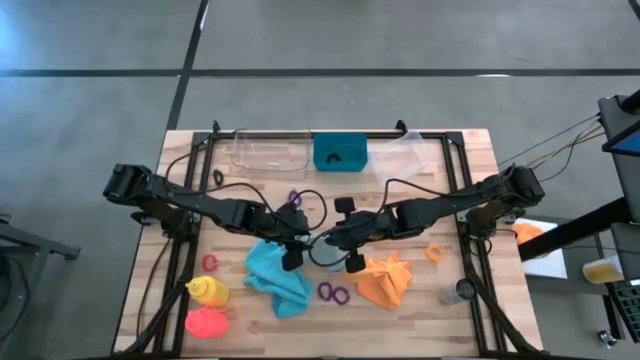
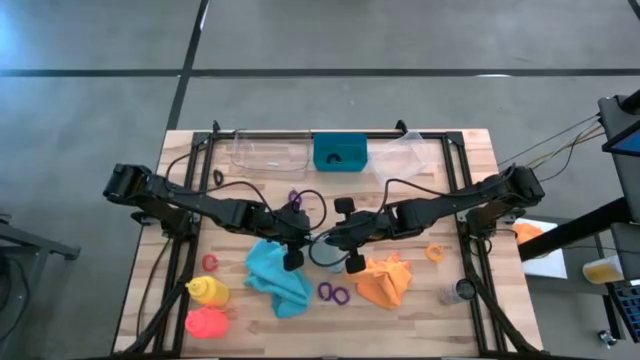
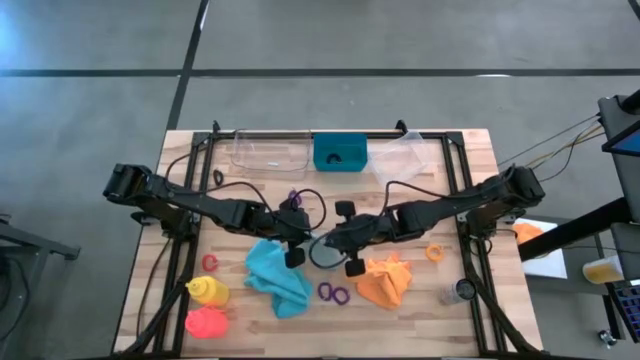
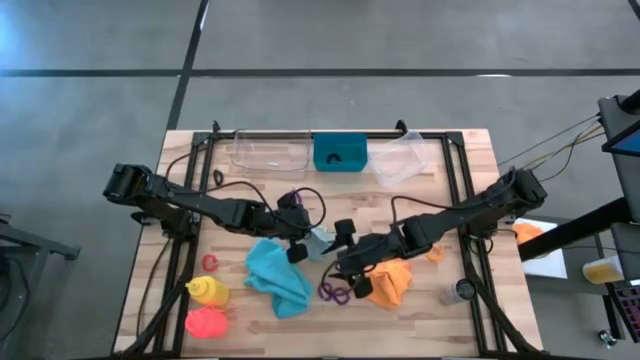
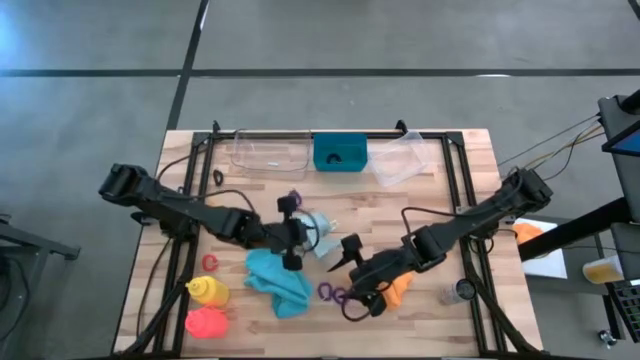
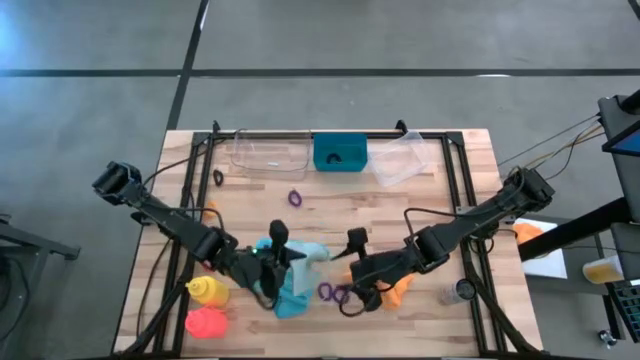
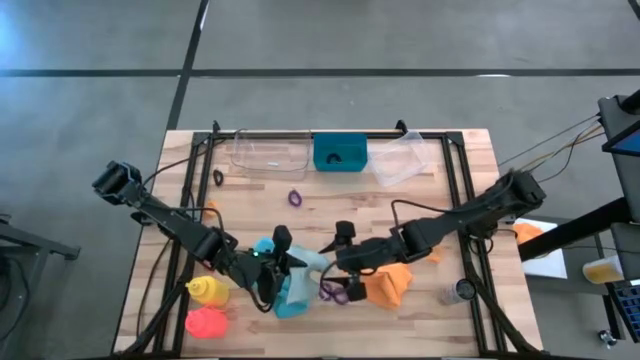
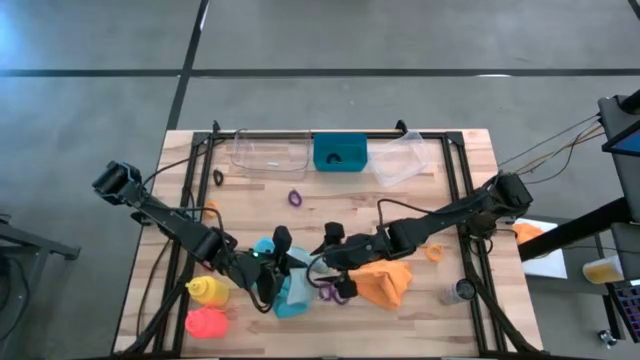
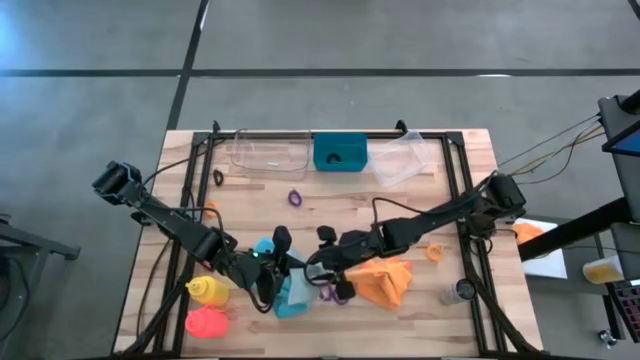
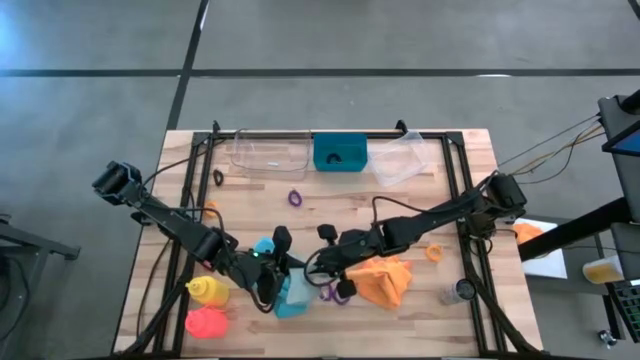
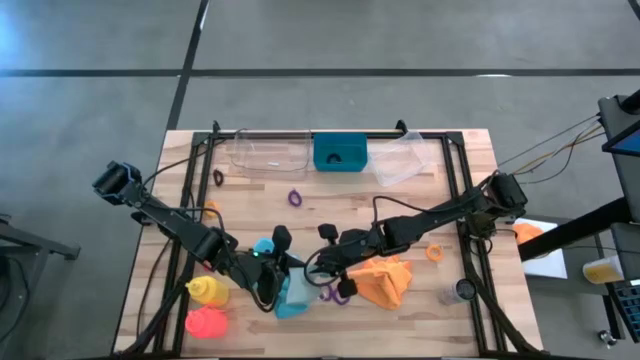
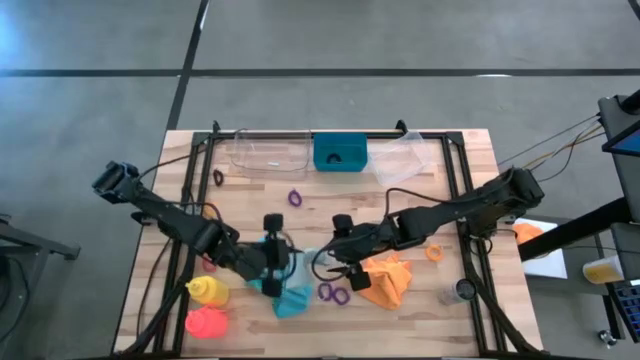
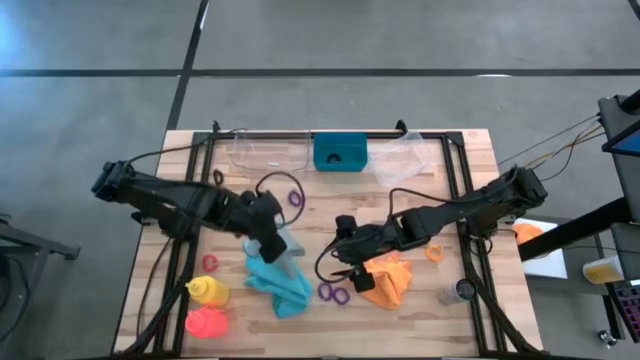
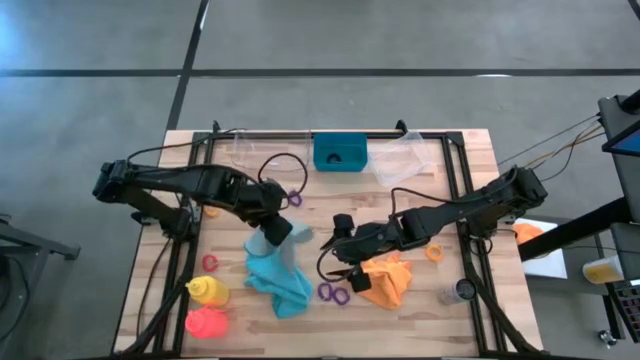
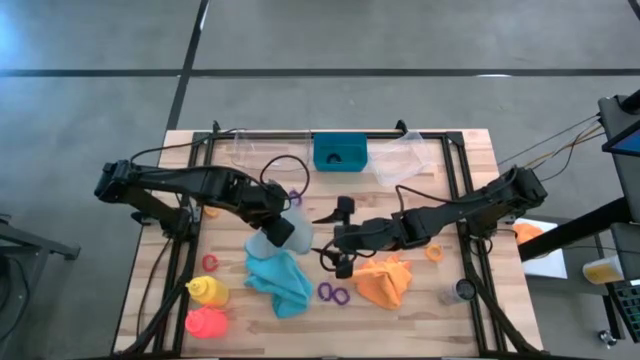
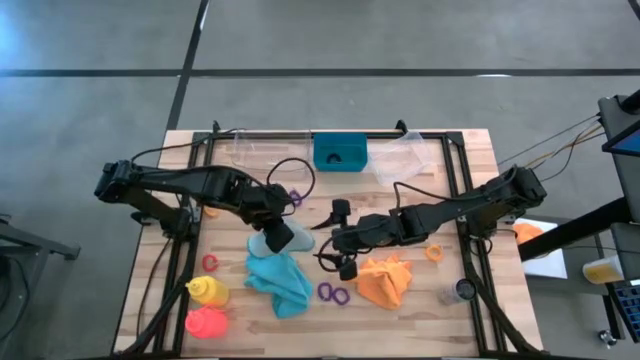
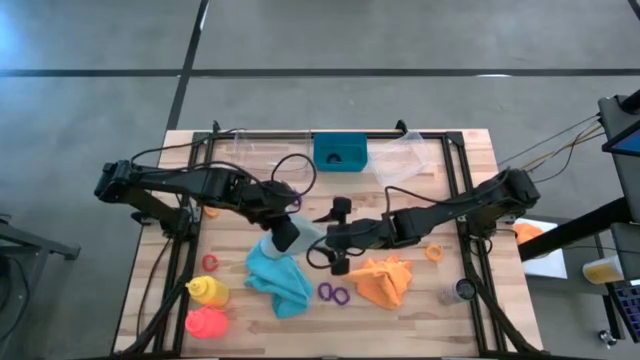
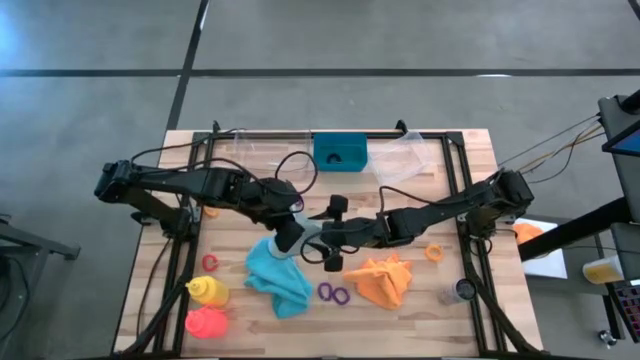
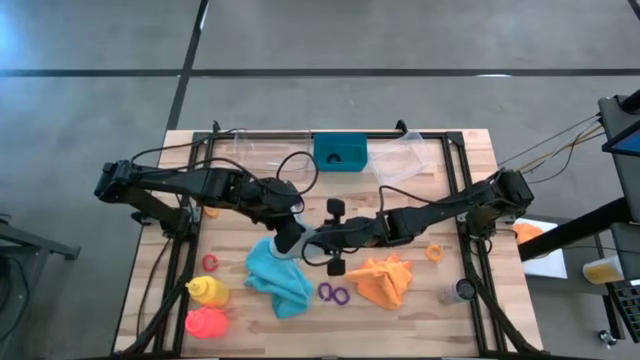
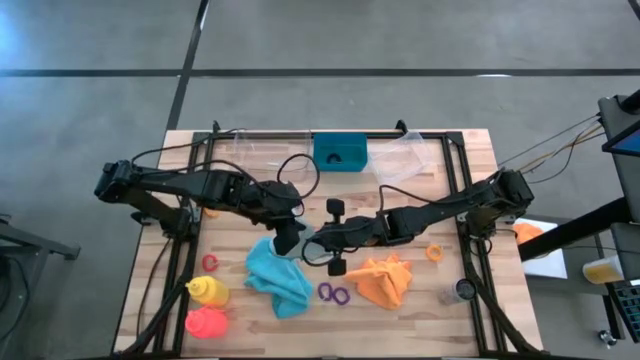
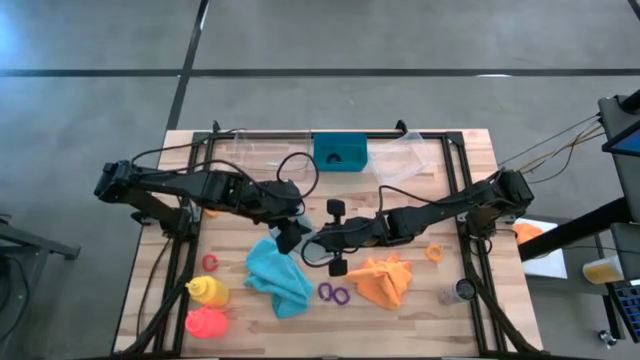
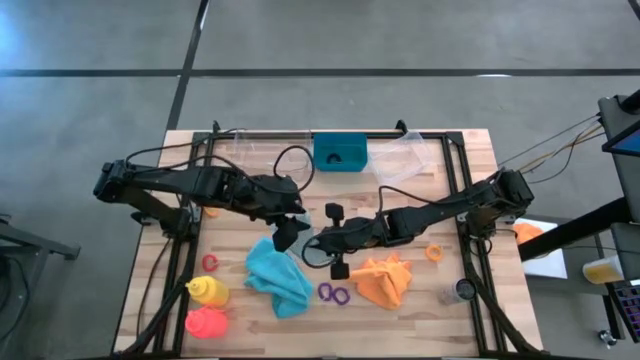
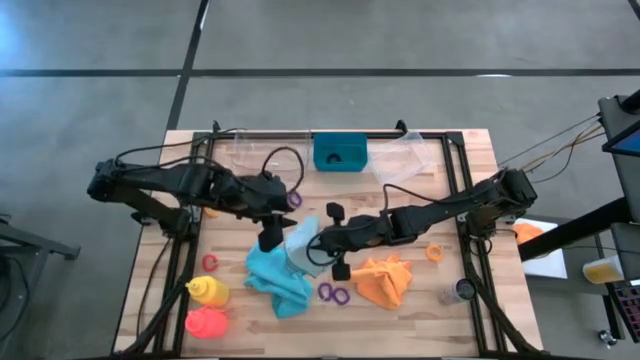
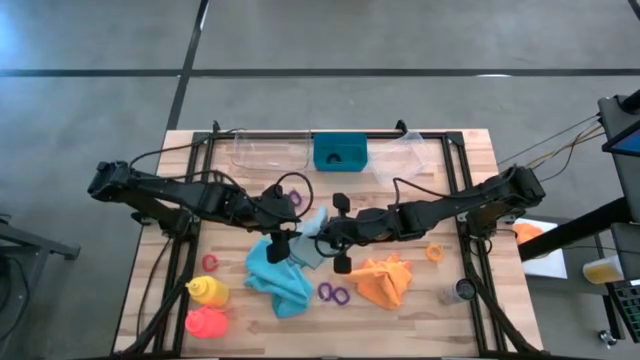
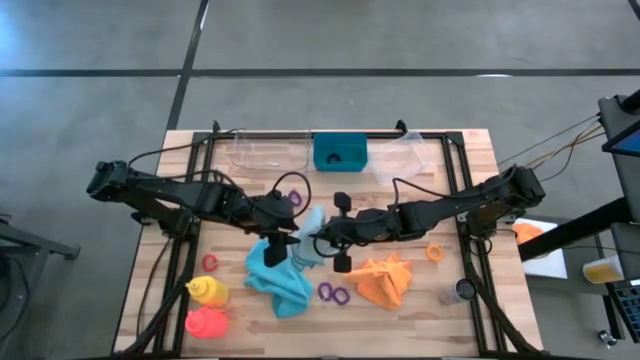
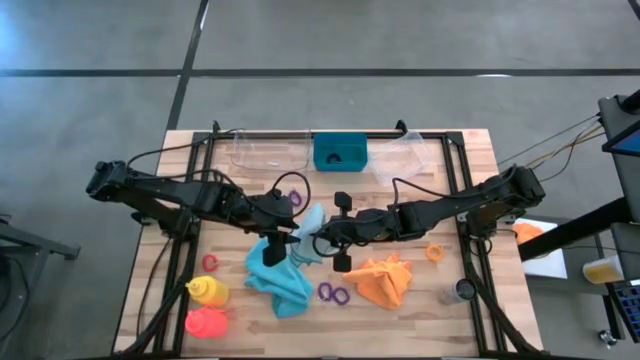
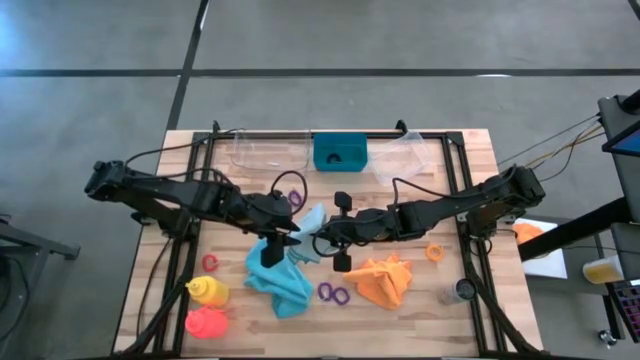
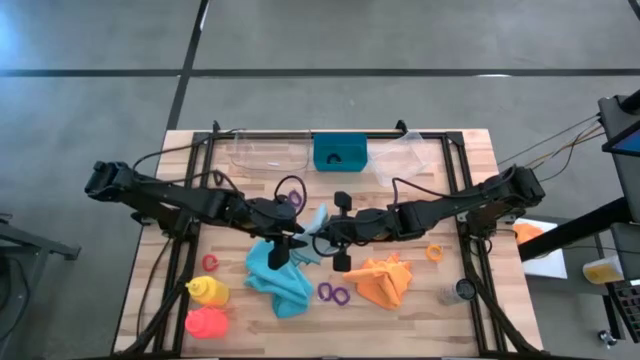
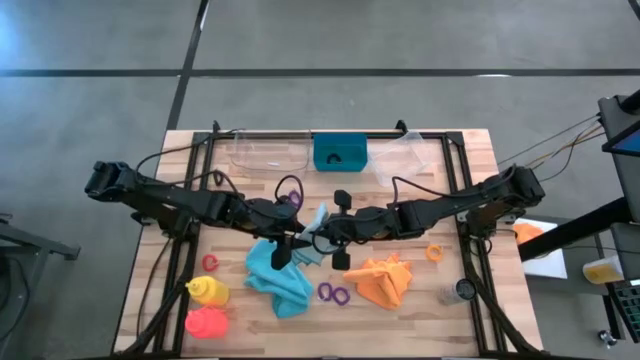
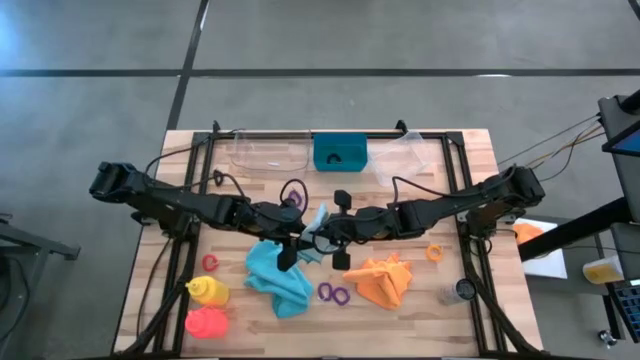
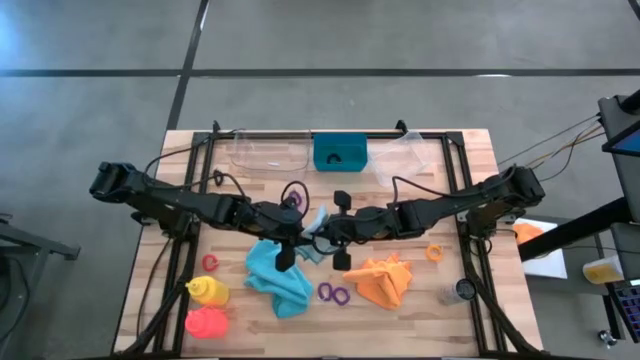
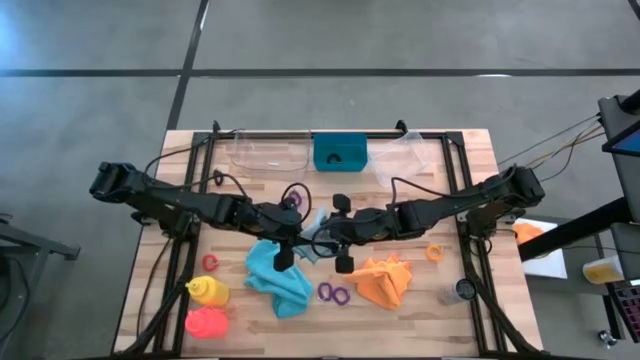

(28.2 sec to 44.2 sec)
Task: Pick & Place Sports Items
Fold the light blue towel

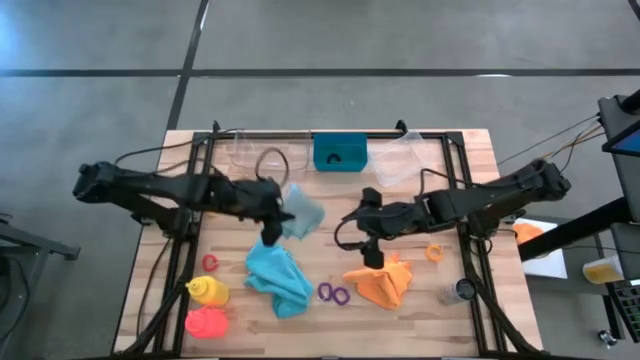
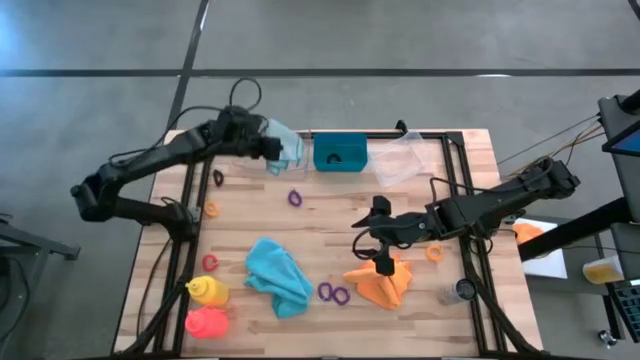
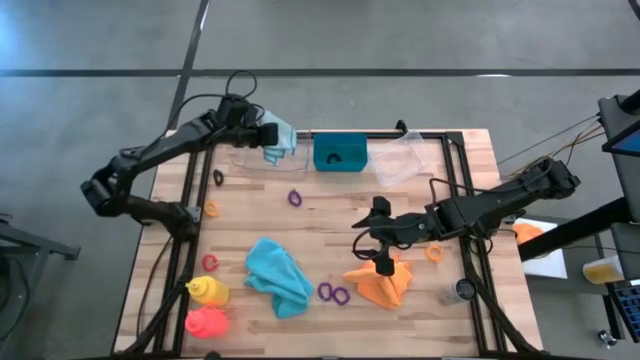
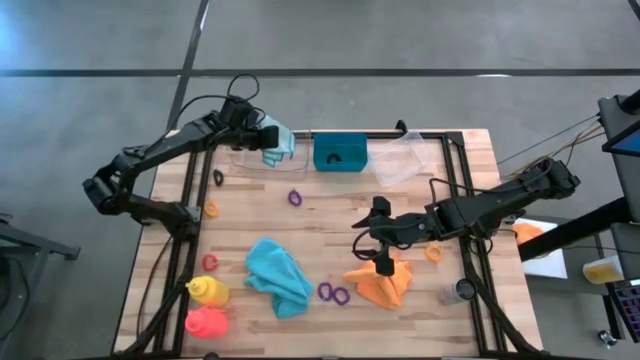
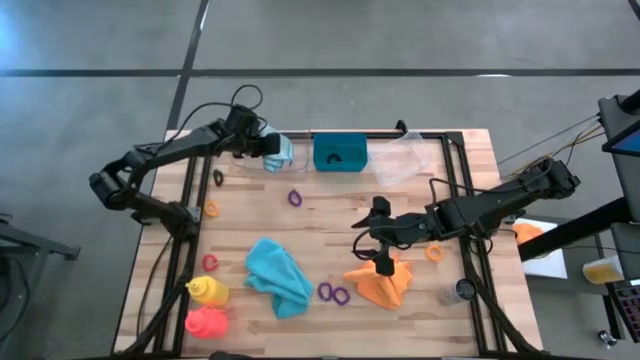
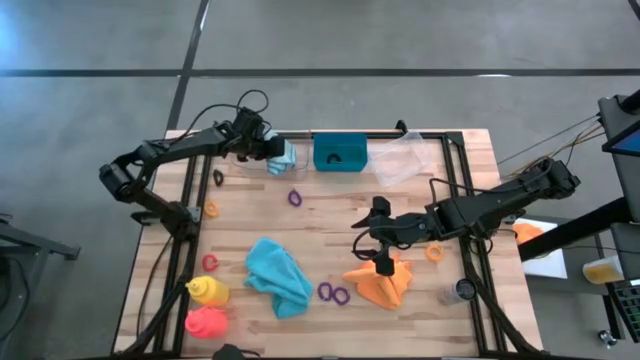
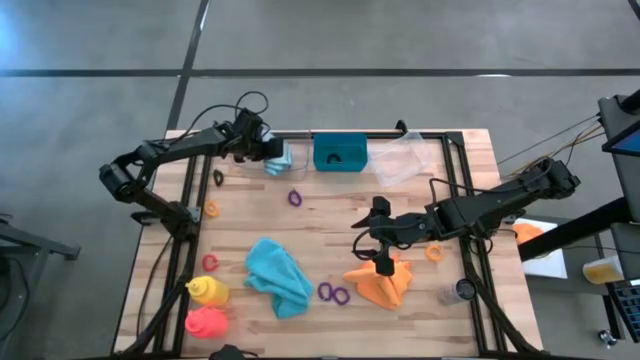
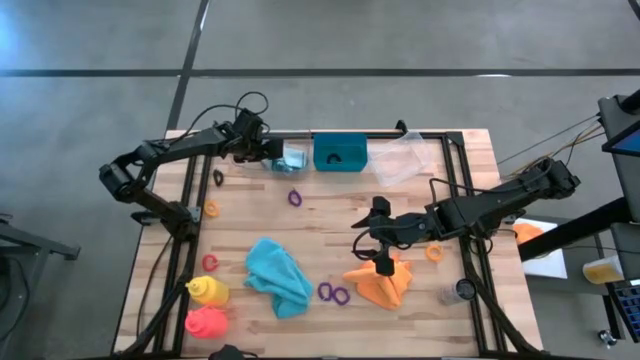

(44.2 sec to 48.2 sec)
Put the folded light blue towel into the transparent bin
